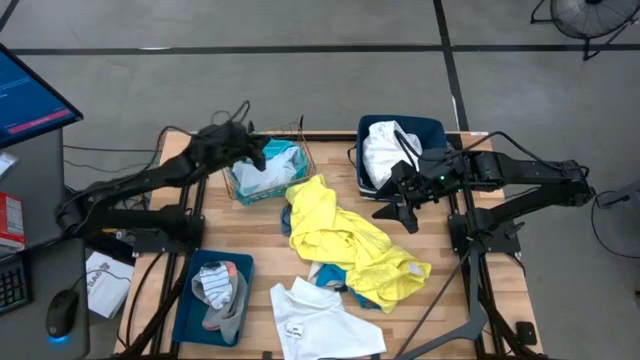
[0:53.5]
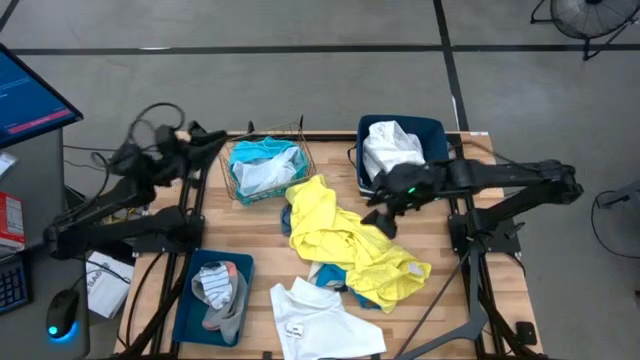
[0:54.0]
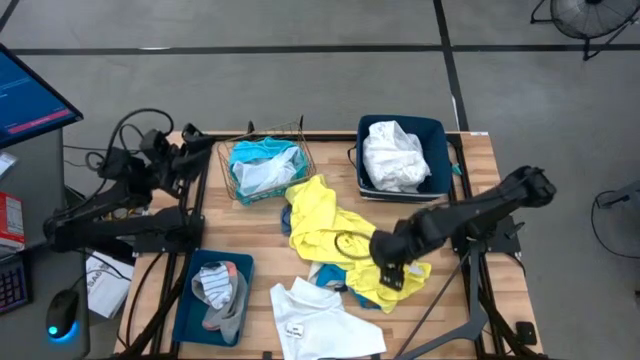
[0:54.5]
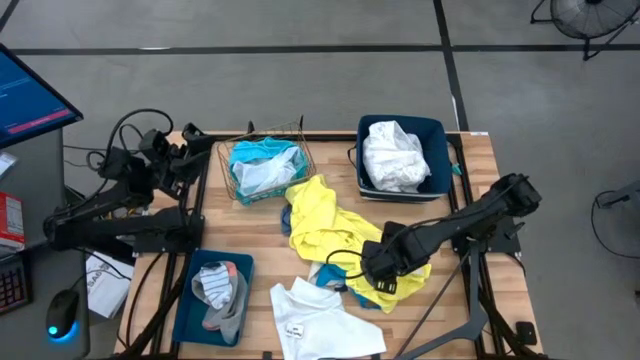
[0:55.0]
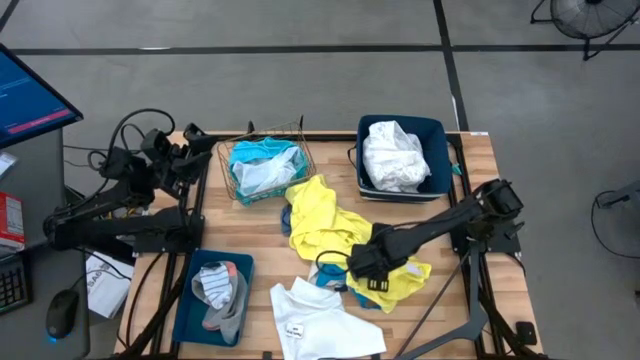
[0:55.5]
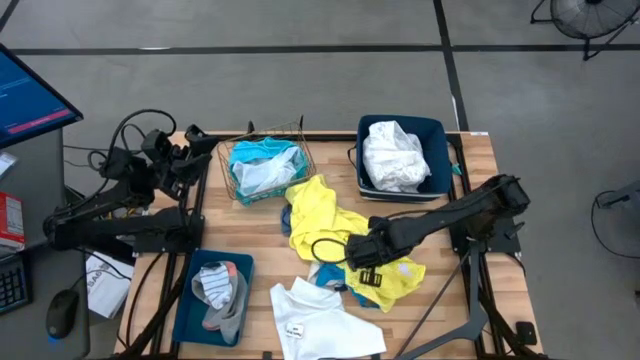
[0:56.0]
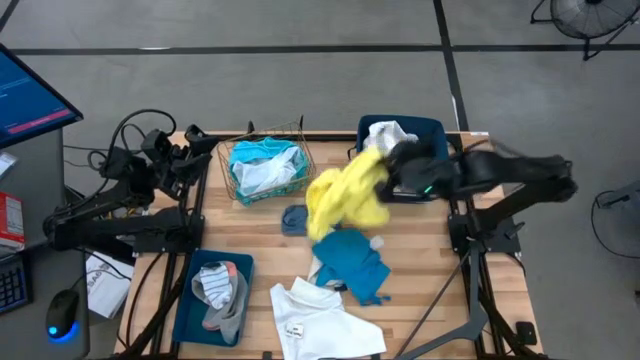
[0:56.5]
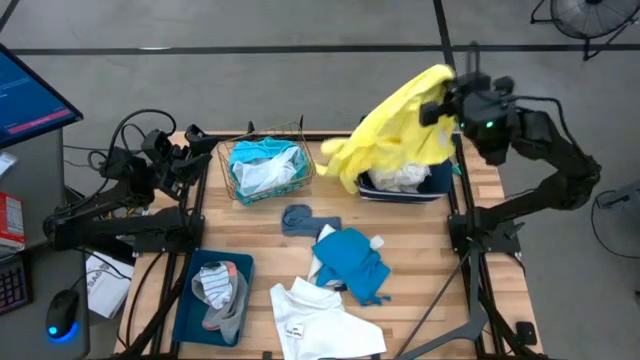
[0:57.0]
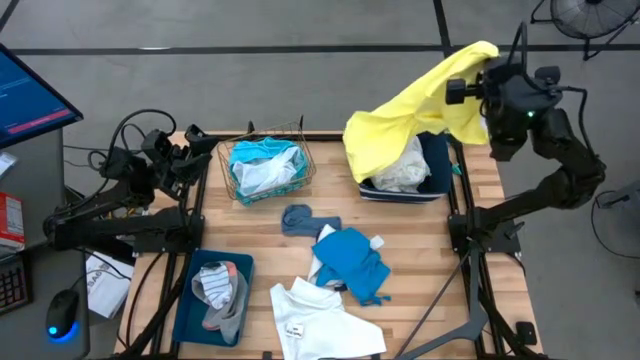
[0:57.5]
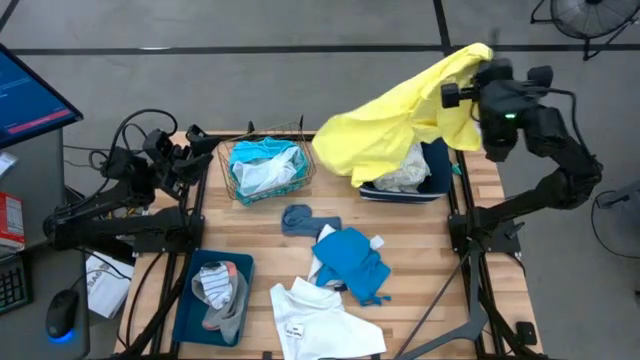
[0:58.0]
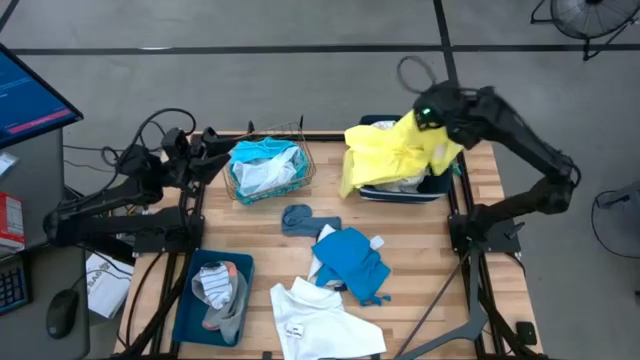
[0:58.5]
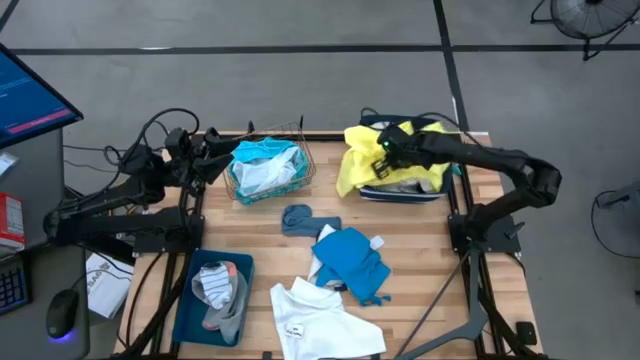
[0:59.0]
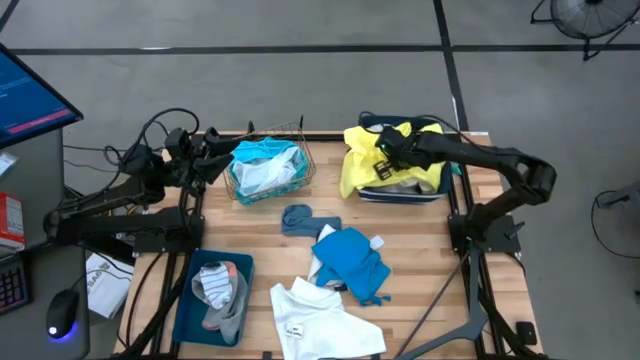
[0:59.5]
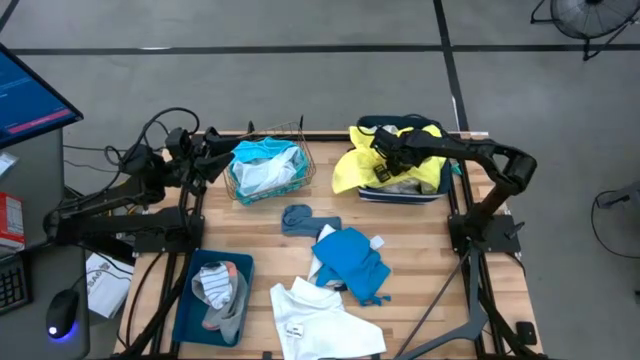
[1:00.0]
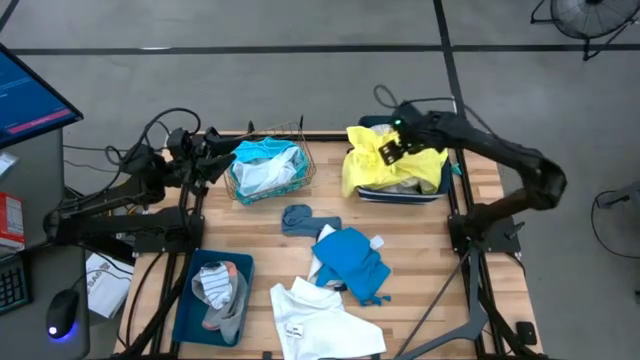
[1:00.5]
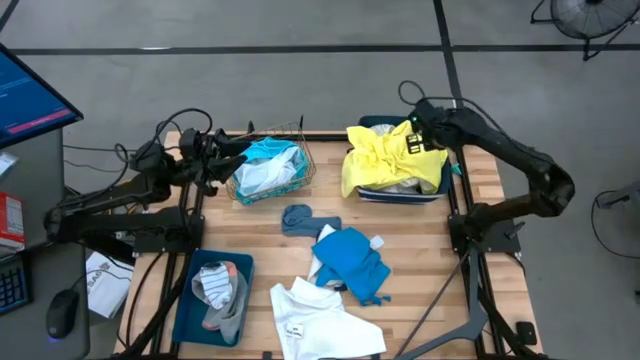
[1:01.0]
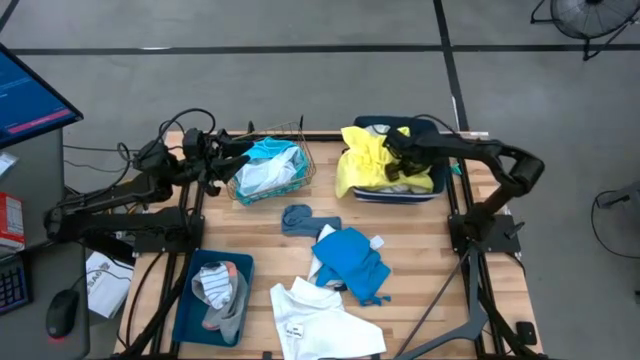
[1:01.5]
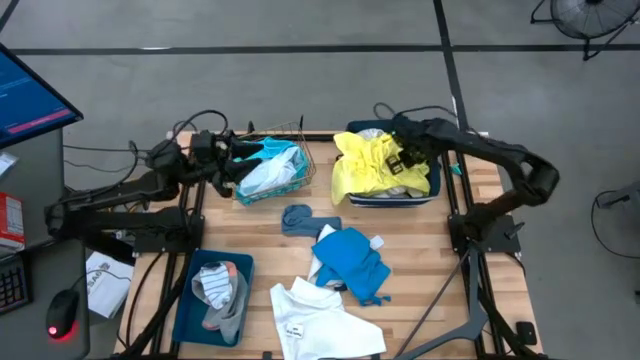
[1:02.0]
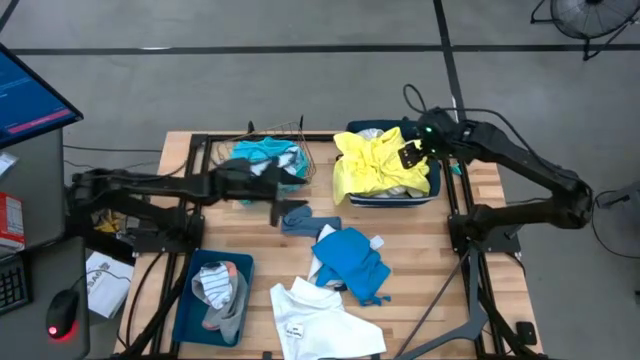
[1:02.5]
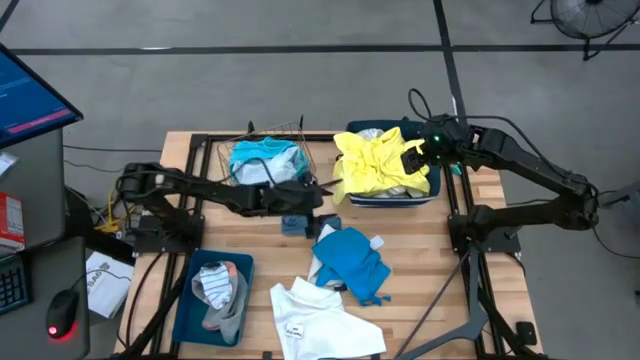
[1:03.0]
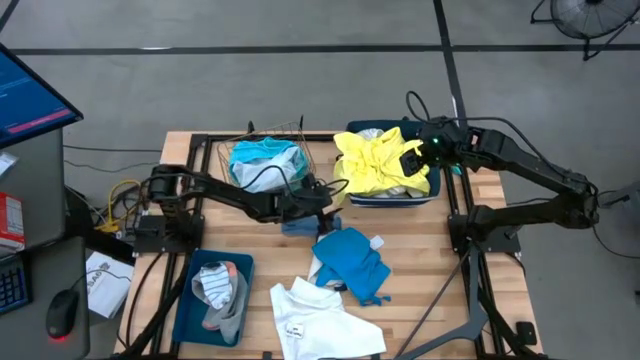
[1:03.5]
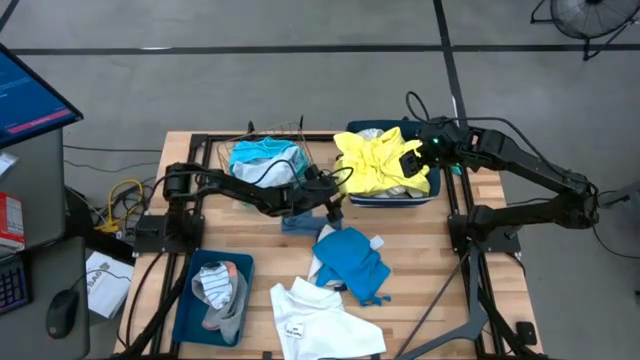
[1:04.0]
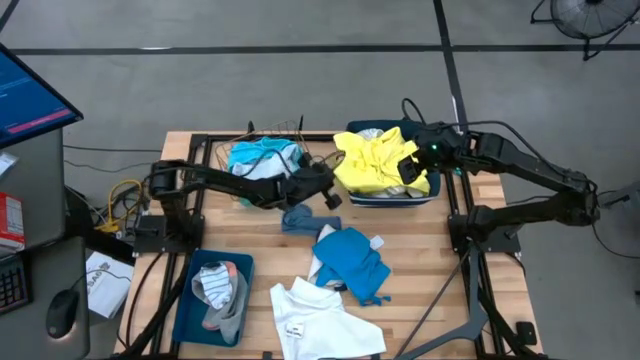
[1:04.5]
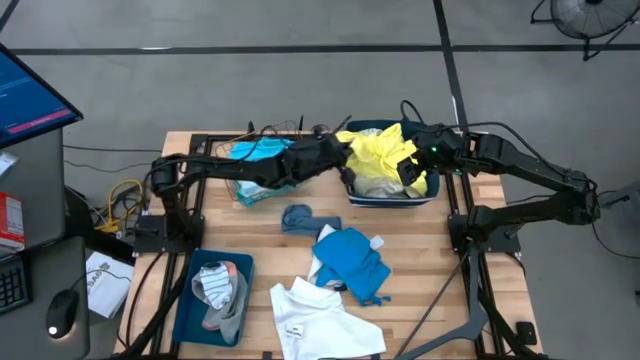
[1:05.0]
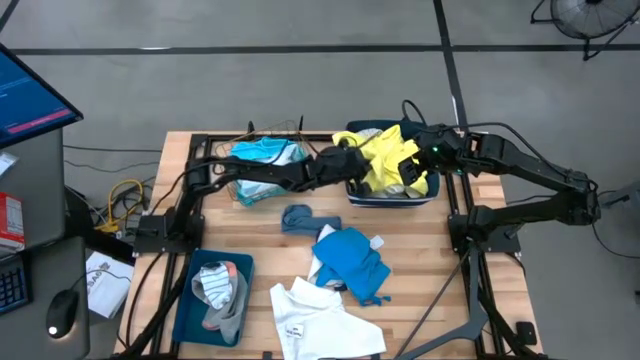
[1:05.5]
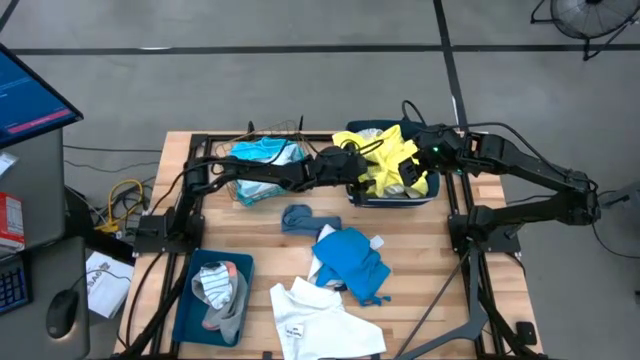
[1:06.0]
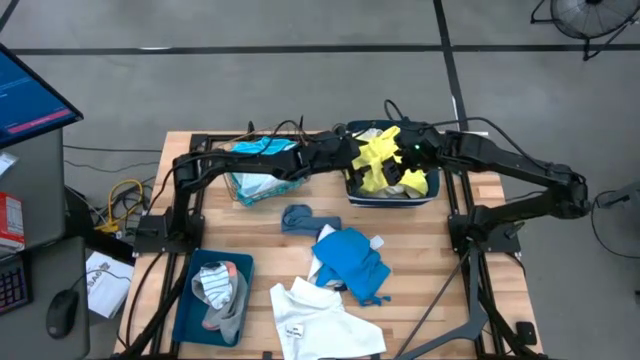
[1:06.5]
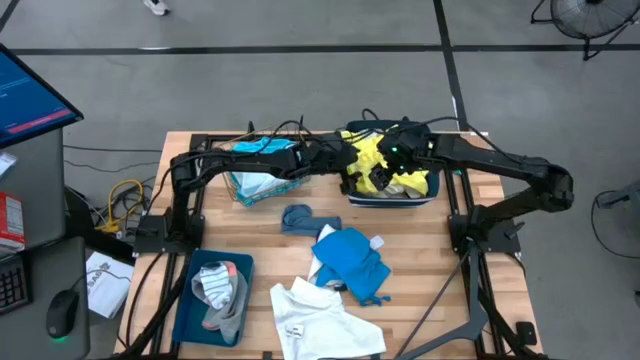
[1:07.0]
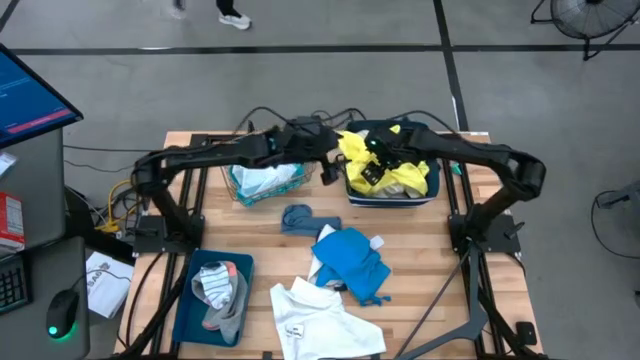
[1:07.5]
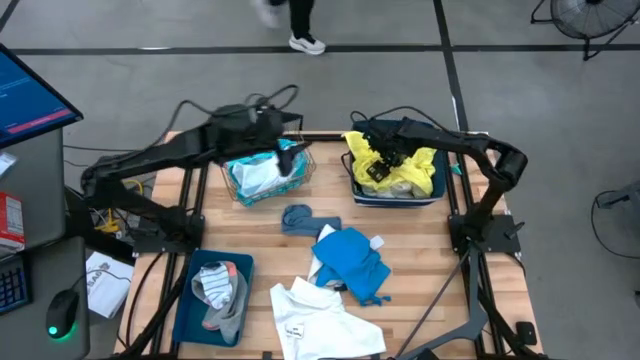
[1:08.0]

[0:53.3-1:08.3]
Task: Pick & Place Cloths
Put the yellow shirt into the dark blue bin

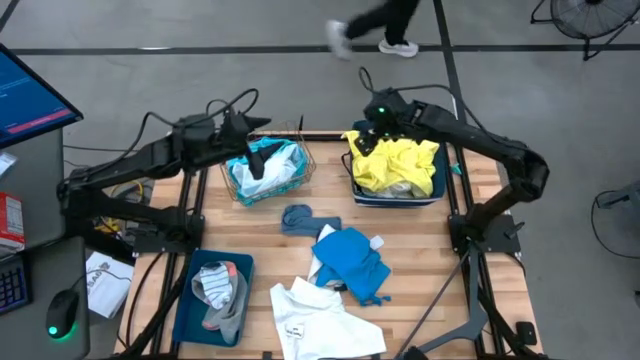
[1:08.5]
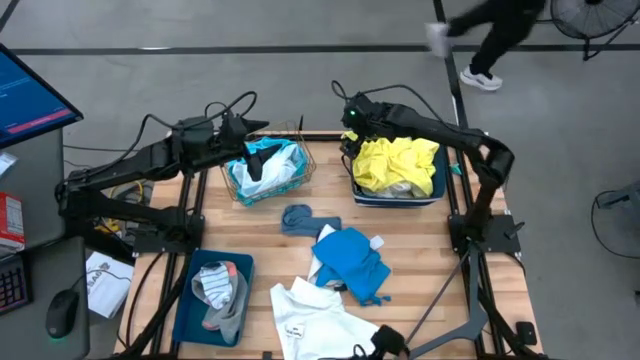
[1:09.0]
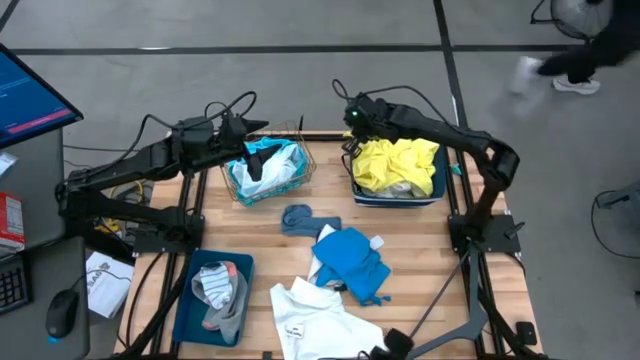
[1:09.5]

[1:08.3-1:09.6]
Put the yellow shirt into the dark blue bin

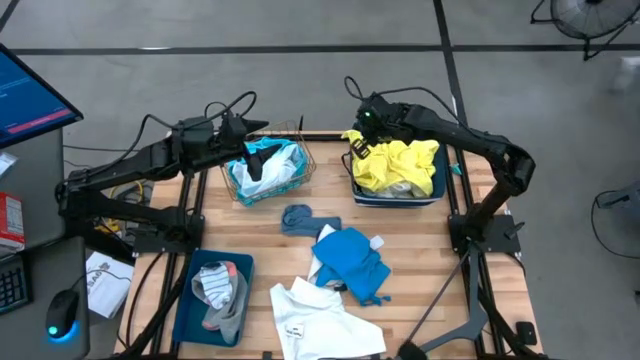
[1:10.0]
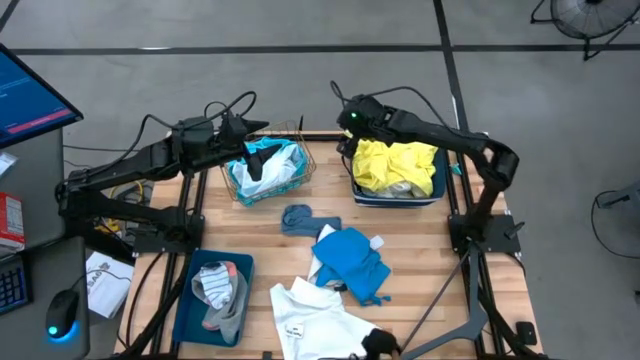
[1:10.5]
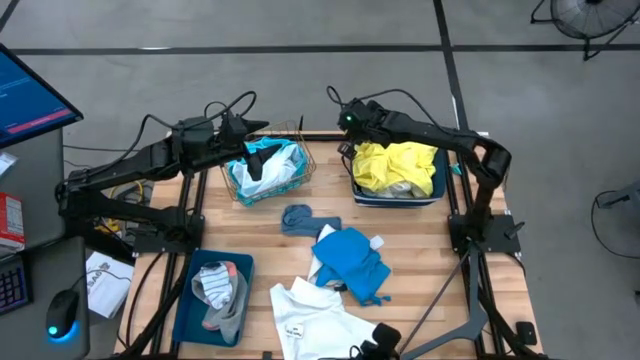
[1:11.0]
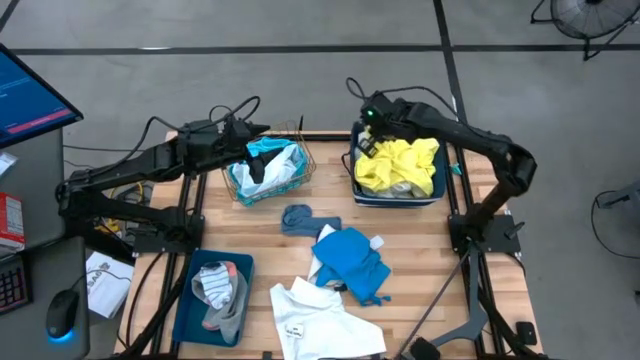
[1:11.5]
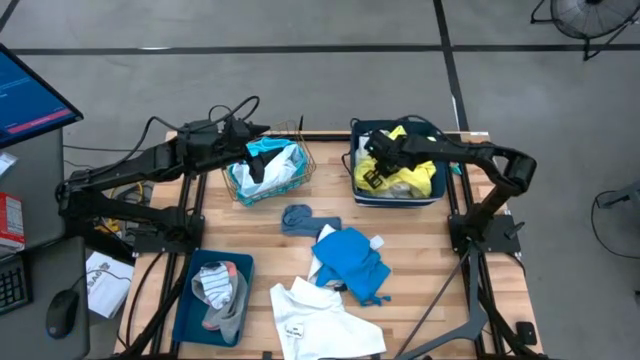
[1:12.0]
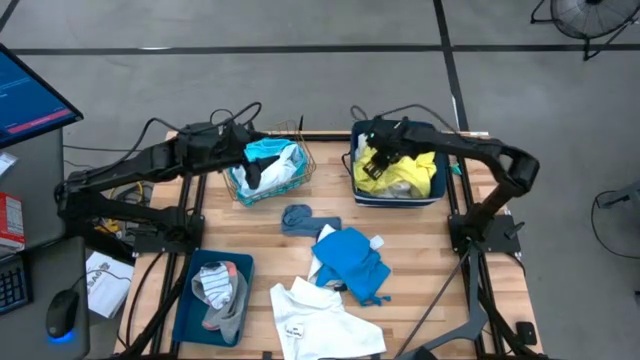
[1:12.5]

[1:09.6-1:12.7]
Put the yellow shirt into the dark blue bin

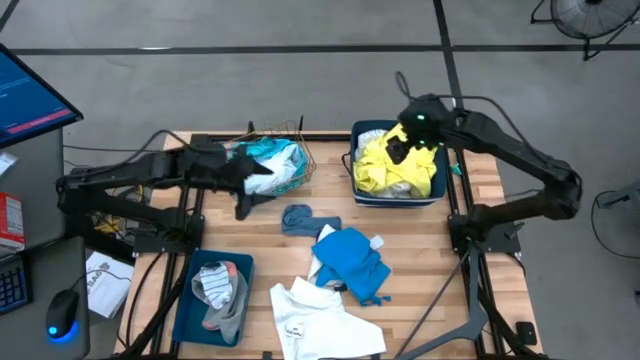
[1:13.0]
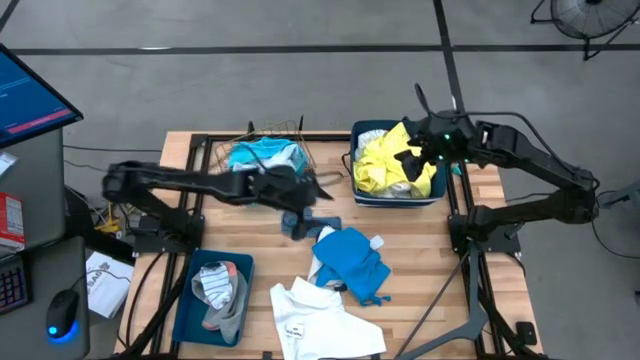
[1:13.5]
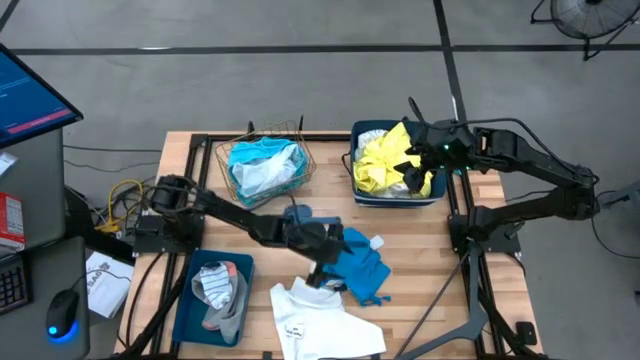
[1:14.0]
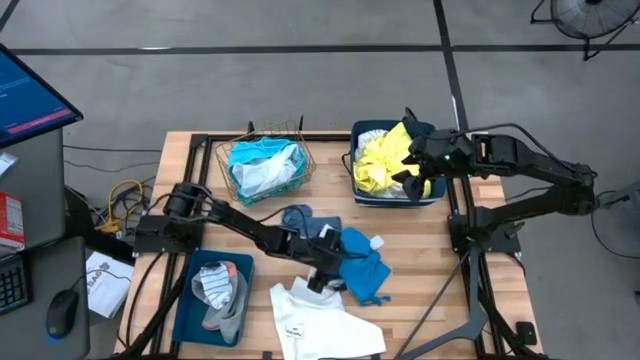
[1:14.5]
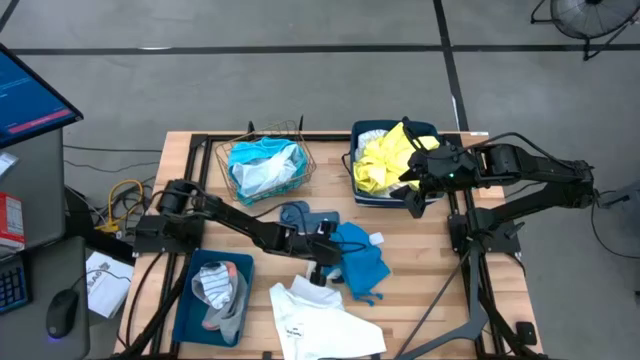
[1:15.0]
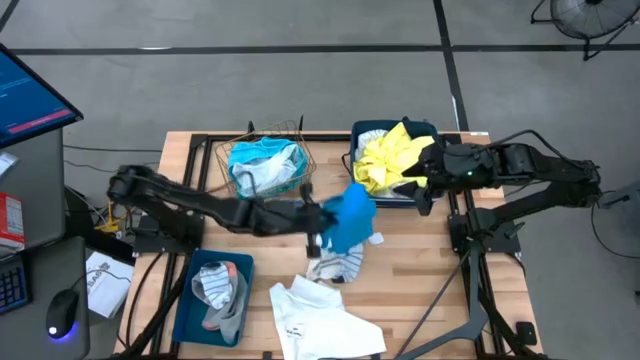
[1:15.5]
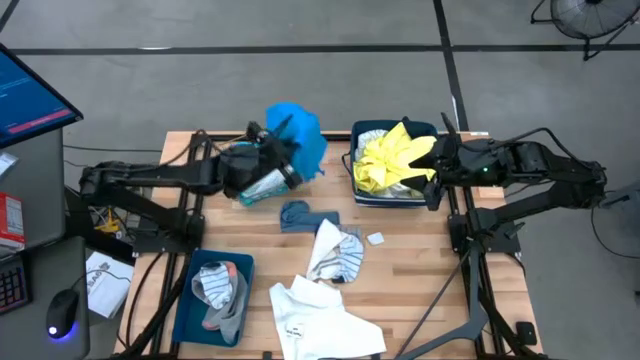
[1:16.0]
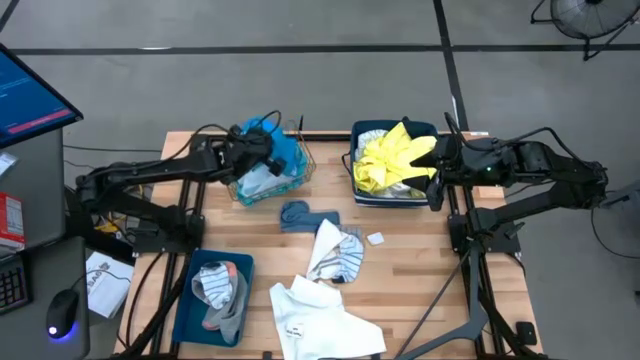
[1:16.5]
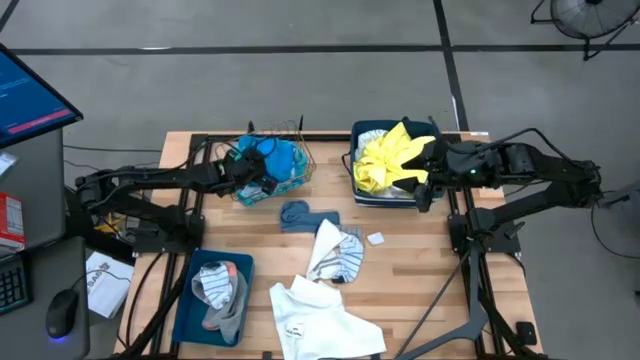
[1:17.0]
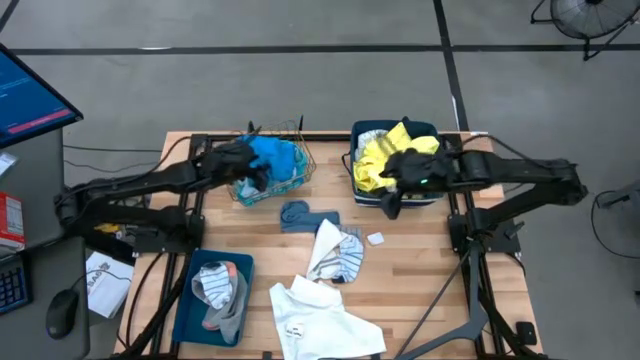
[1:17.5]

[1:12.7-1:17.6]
Put the blue shorts into the gold wire basket
